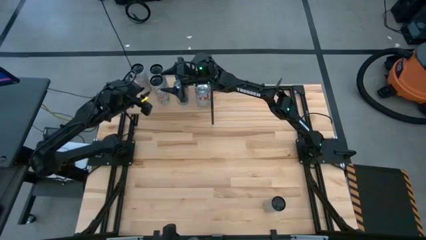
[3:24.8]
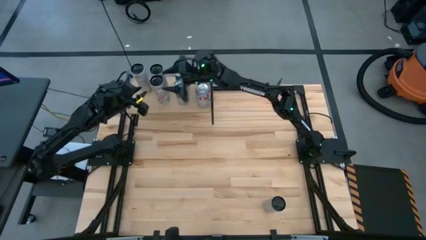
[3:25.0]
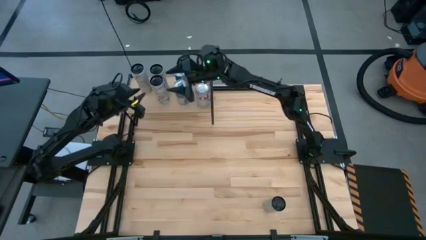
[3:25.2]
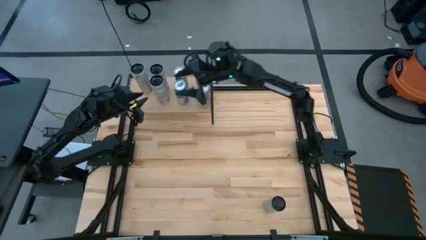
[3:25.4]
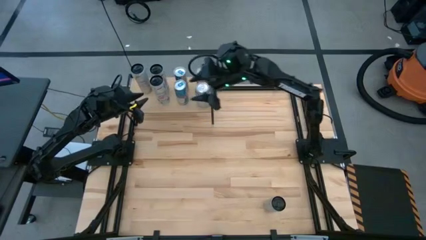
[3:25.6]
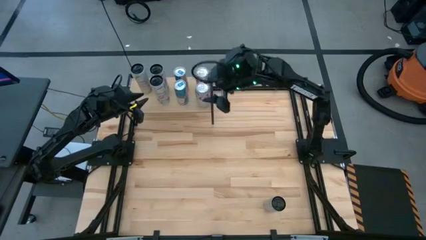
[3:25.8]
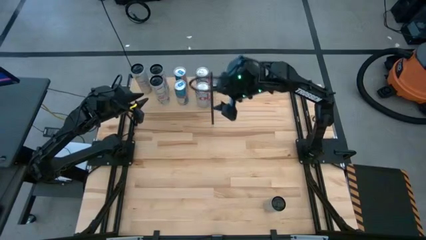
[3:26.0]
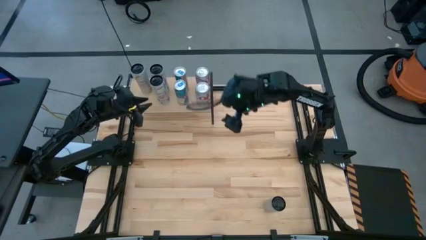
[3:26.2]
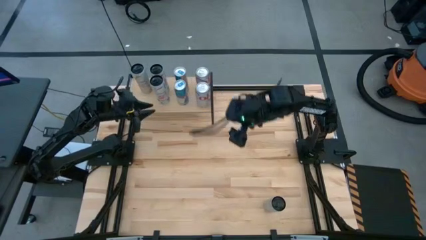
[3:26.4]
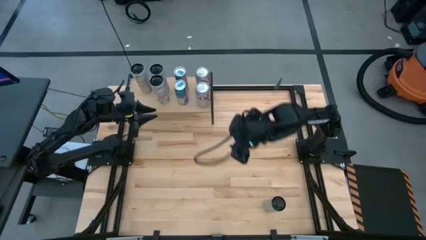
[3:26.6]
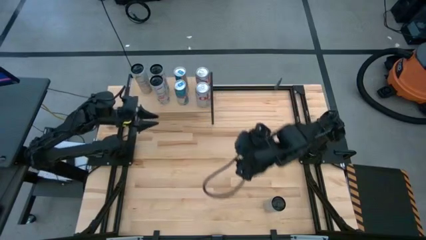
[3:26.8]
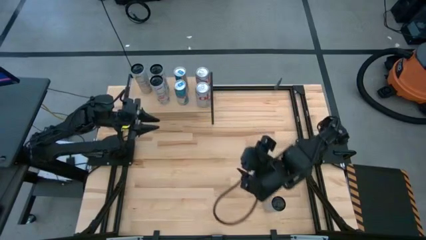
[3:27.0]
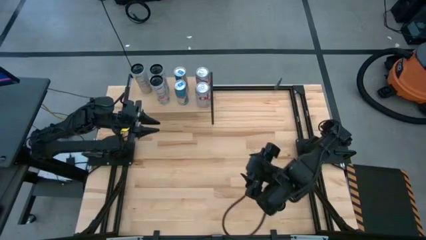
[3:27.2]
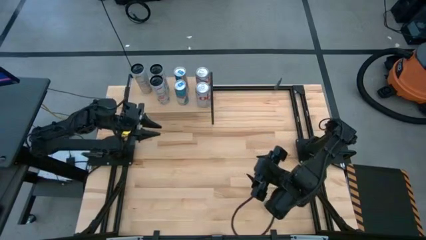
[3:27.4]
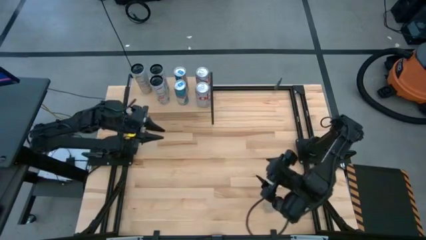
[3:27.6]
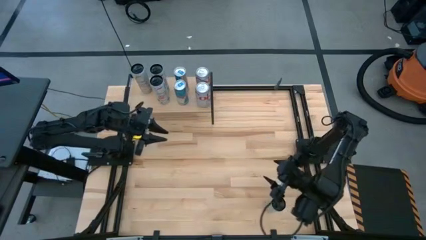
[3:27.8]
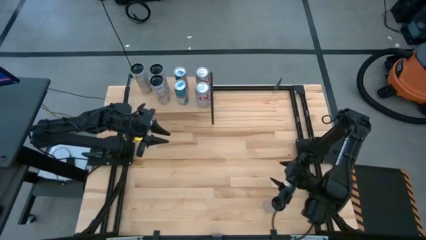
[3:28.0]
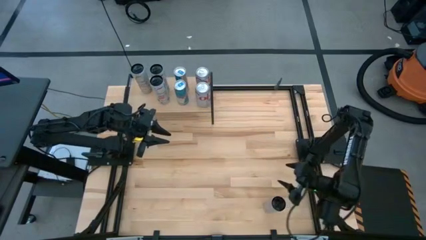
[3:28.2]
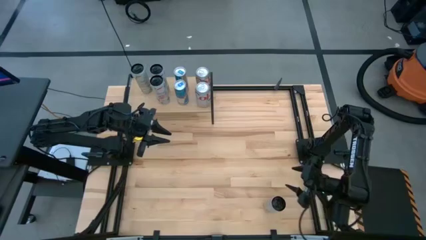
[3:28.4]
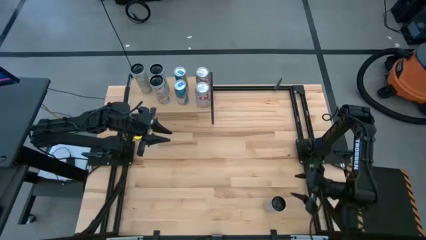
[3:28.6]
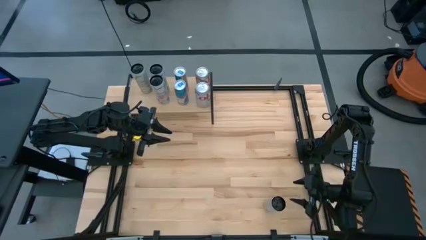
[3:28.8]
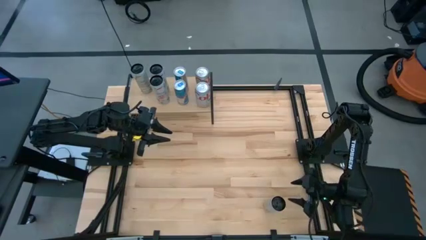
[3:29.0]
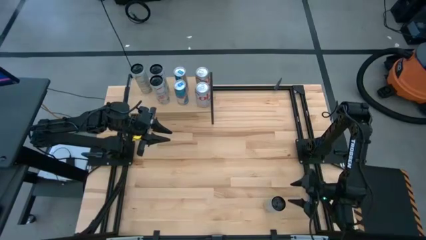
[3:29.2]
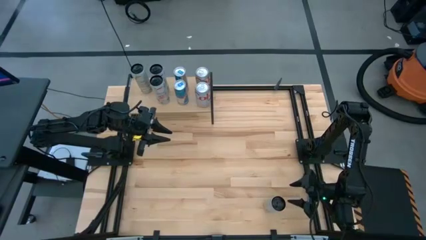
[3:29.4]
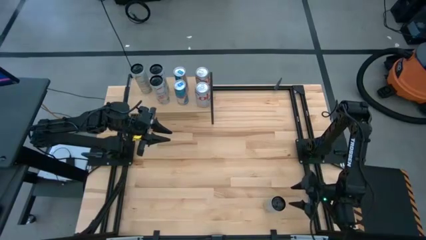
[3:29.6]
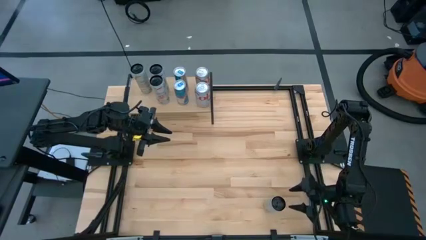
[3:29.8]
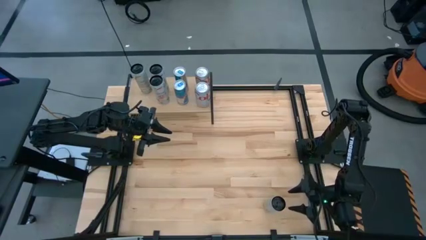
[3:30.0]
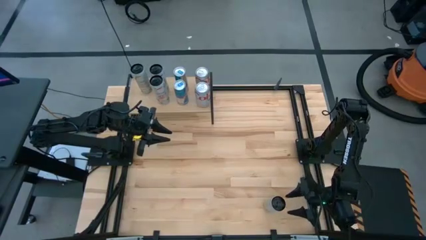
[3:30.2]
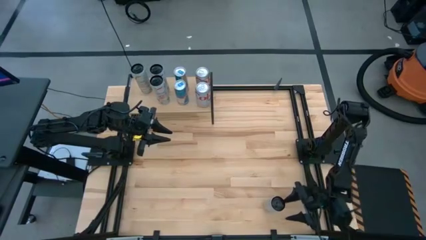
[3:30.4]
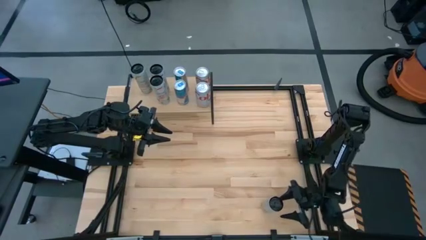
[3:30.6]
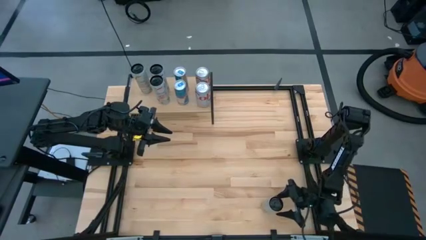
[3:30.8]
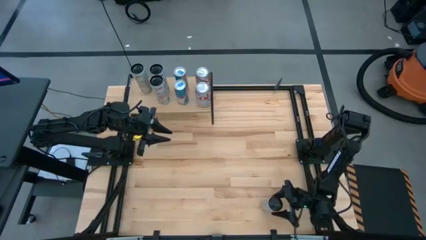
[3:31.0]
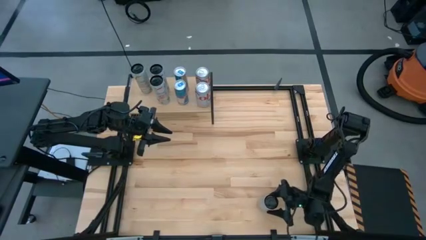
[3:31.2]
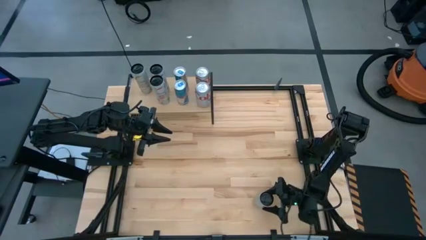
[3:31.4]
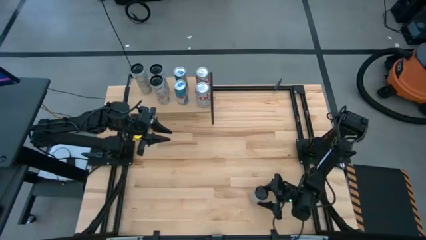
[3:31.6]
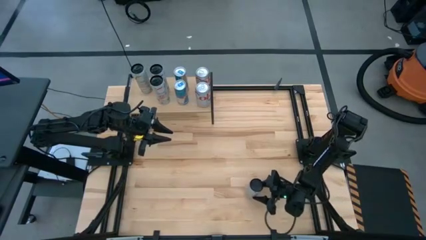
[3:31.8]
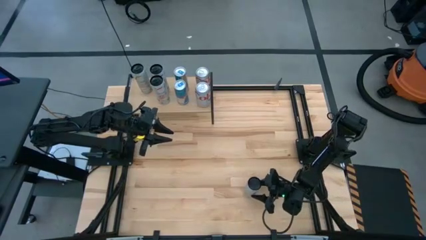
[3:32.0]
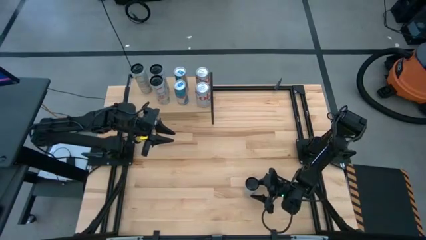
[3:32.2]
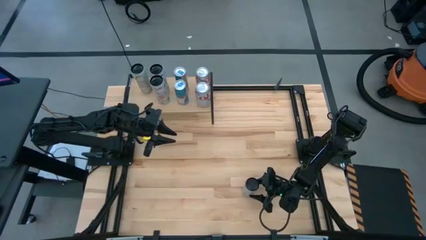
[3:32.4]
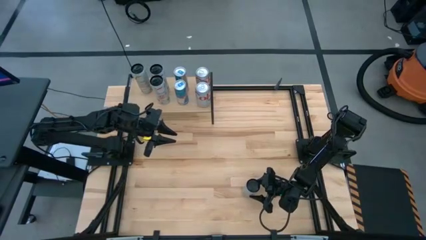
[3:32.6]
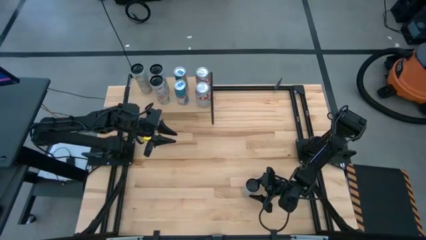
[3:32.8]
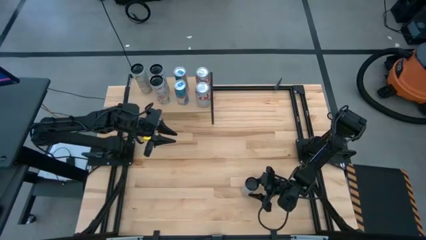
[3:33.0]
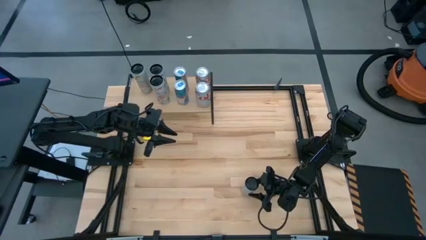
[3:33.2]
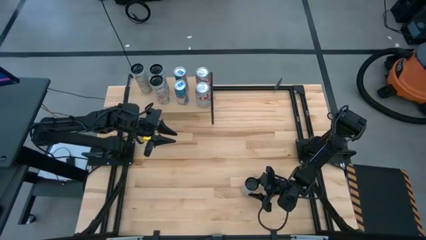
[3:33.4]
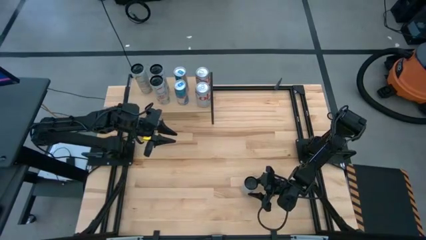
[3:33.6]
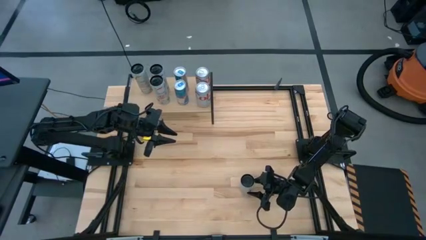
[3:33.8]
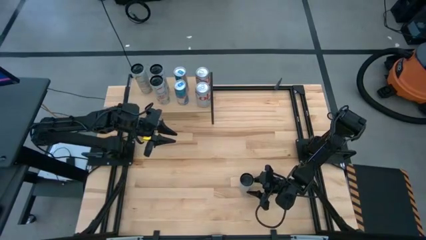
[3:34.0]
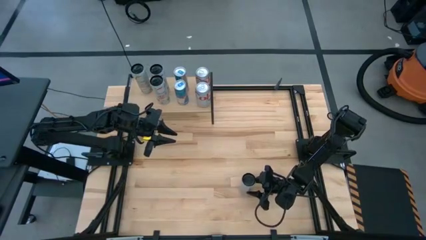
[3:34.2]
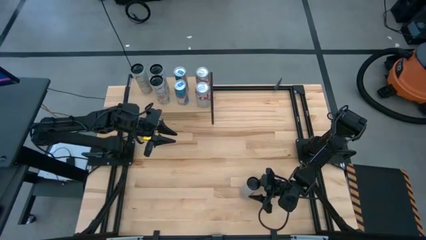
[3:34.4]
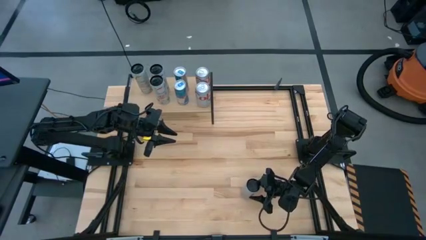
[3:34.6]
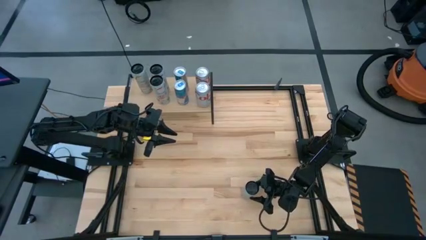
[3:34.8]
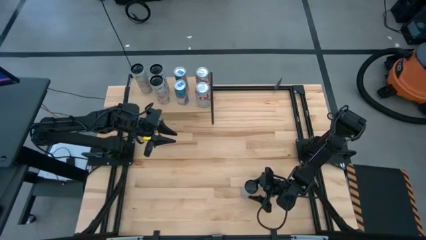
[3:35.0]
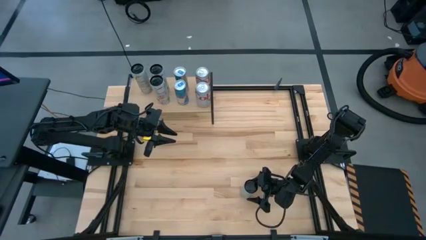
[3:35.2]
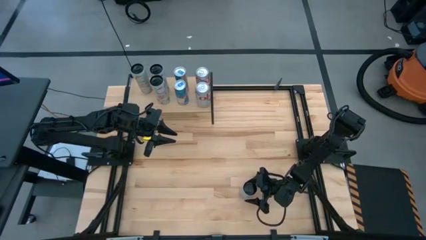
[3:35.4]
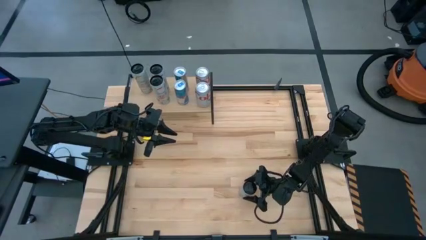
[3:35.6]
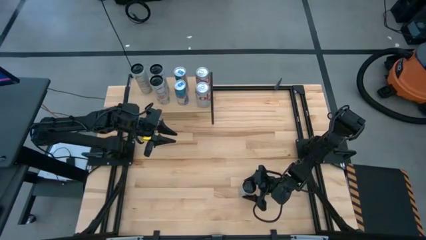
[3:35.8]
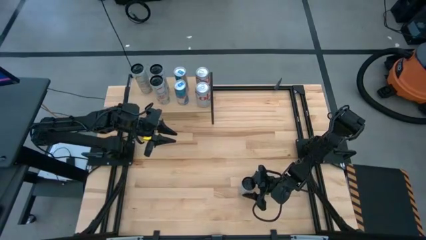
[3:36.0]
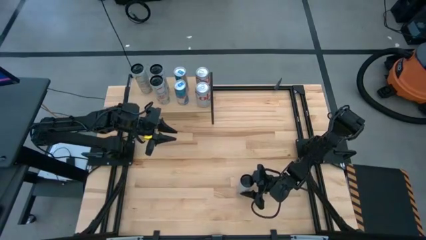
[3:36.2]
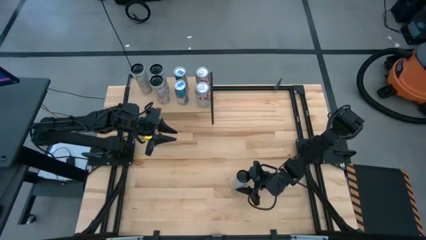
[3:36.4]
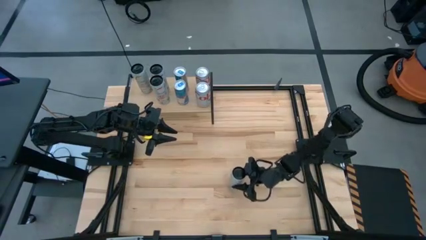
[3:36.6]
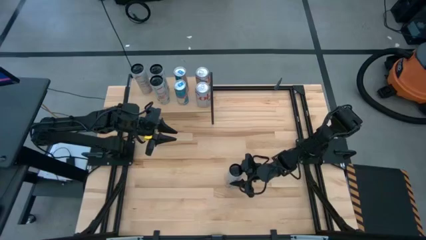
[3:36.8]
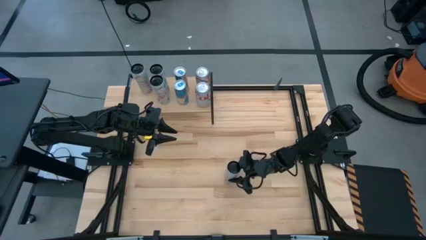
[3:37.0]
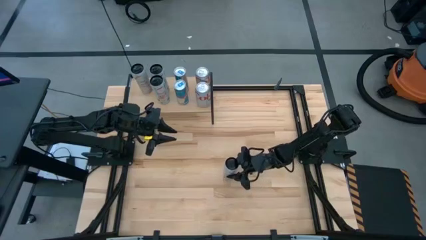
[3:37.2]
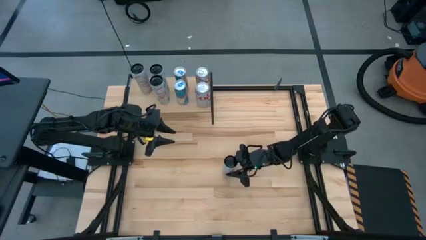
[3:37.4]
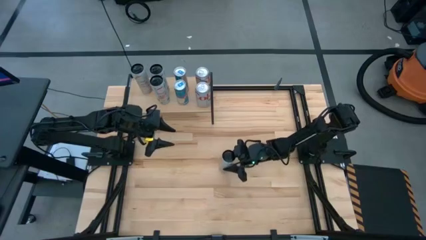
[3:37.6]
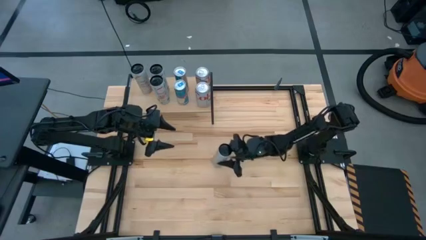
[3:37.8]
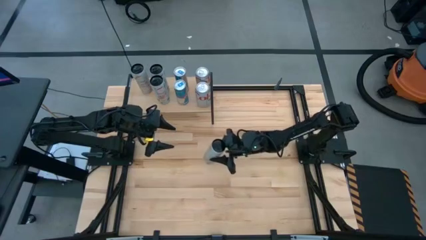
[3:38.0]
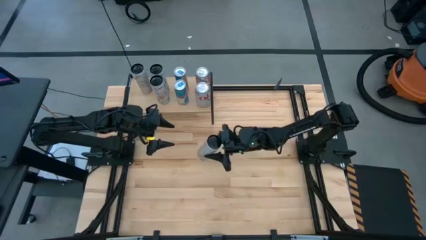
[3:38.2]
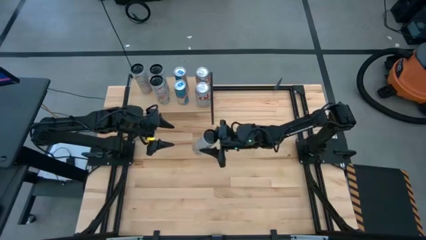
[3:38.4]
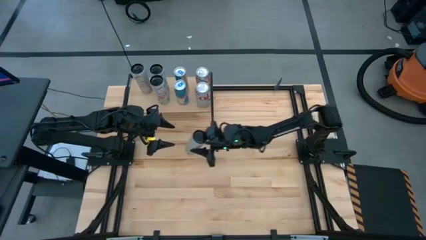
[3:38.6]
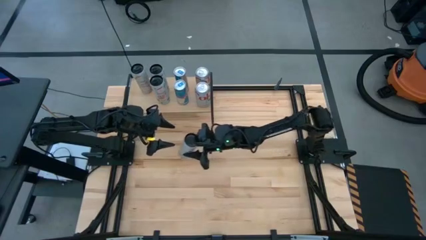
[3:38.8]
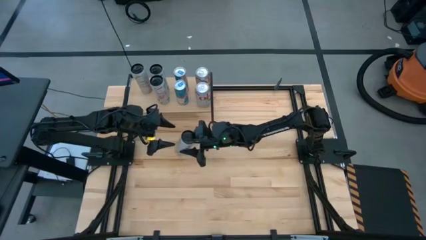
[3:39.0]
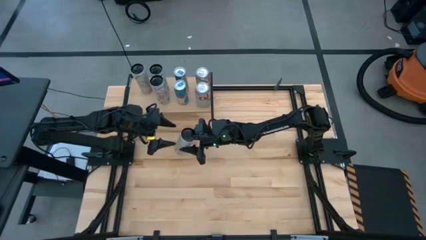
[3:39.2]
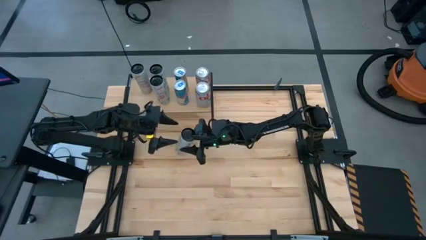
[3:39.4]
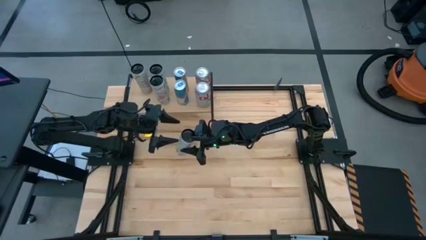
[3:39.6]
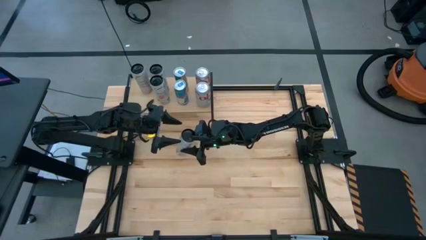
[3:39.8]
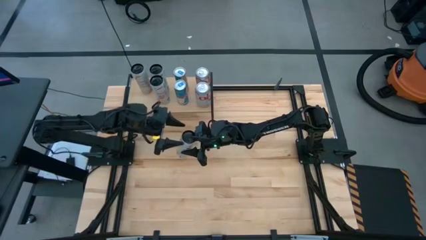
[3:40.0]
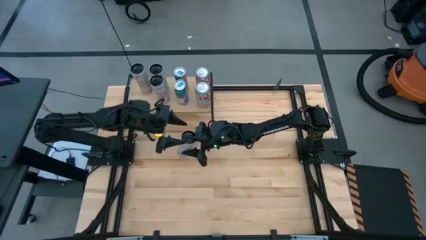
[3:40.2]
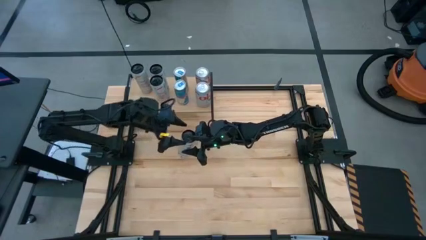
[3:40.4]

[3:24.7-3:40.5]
Task: Place canned beverage on shelf
Put the white-yellow soda can on the shelf aligned with the other white-yellow soda can

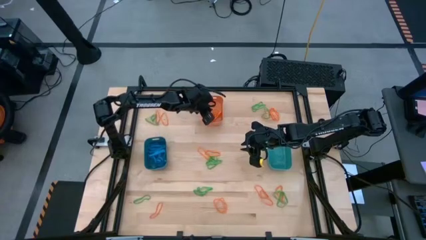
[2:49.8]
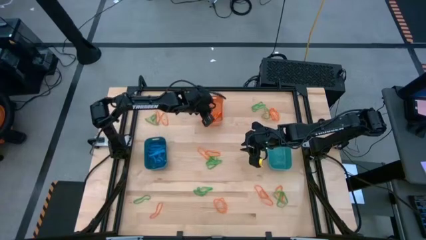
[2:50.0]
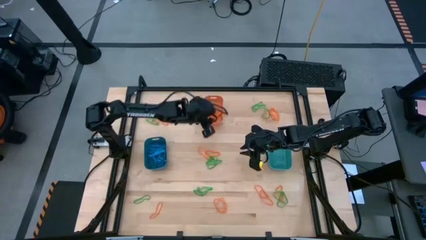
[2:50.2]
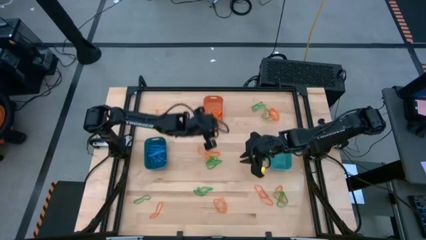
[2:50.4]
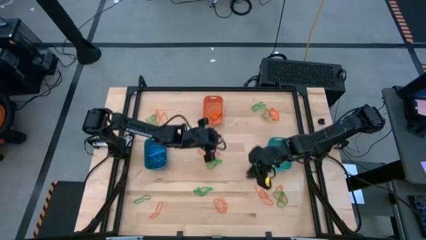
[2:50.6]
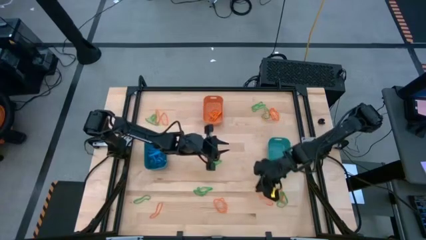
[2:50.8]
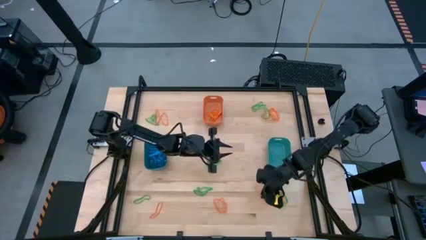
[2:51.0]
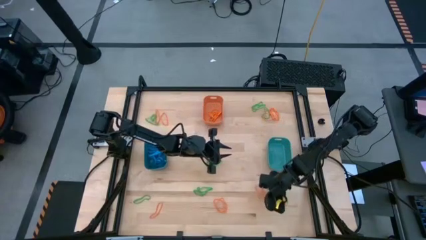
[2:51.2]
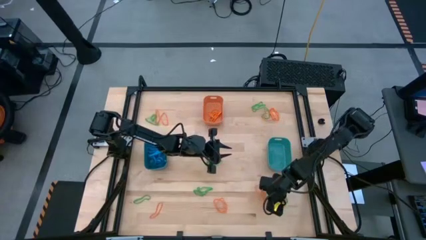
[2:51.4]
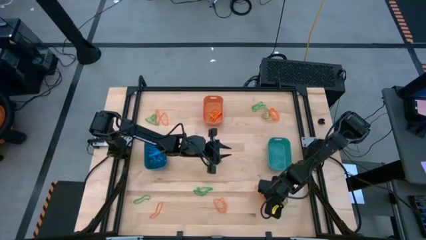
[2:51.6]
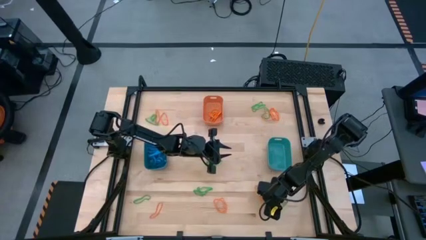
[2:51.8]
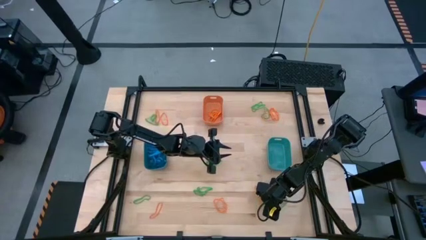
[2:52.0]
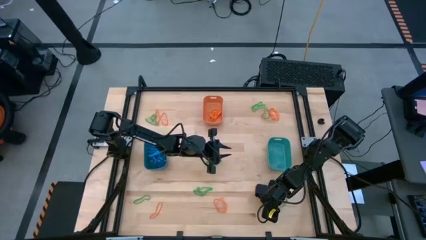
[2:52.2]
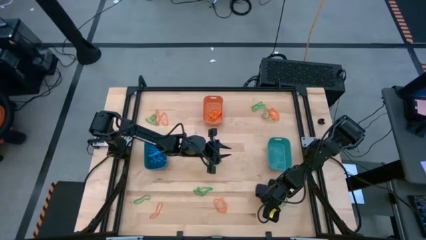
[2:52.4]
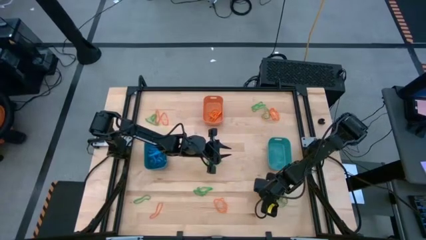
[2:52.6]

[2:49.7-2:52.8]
Task: Sort rubber bands into baskets
Put the orange rubber band into the orange bin
